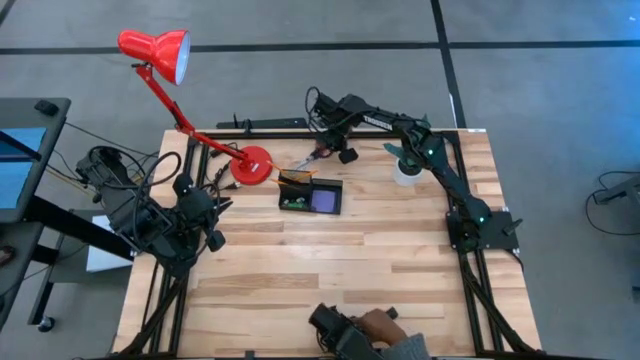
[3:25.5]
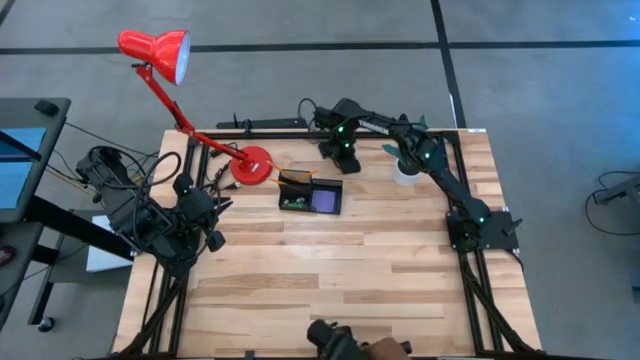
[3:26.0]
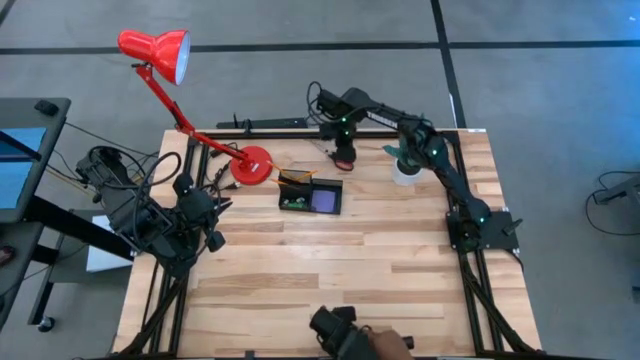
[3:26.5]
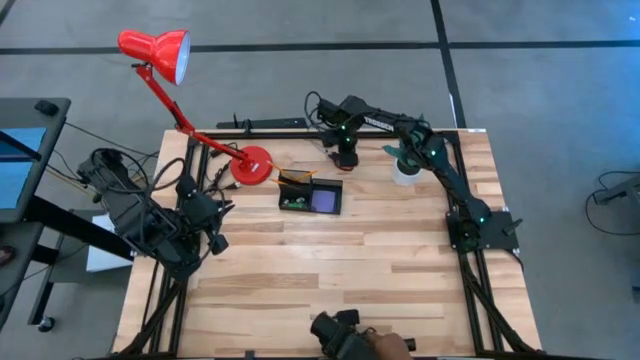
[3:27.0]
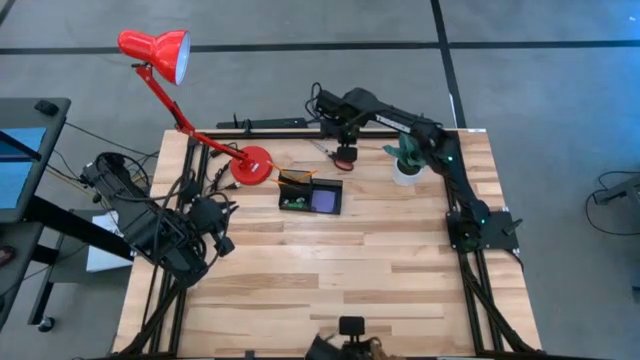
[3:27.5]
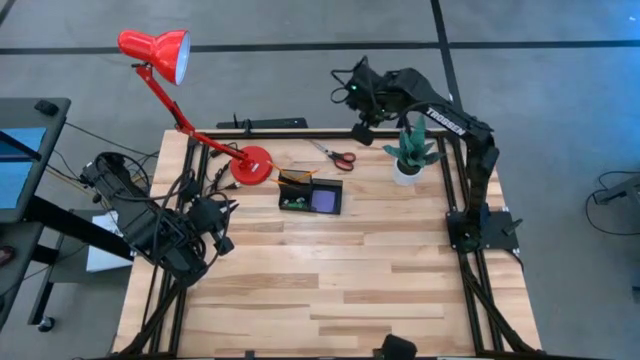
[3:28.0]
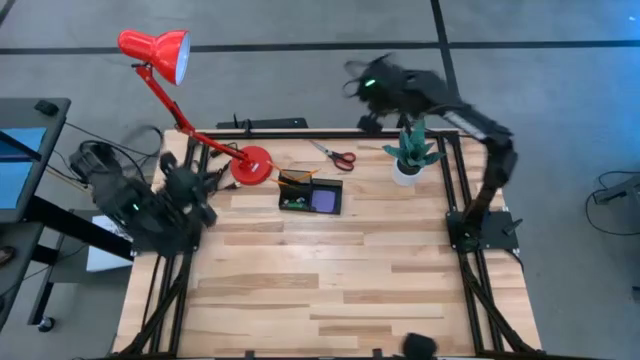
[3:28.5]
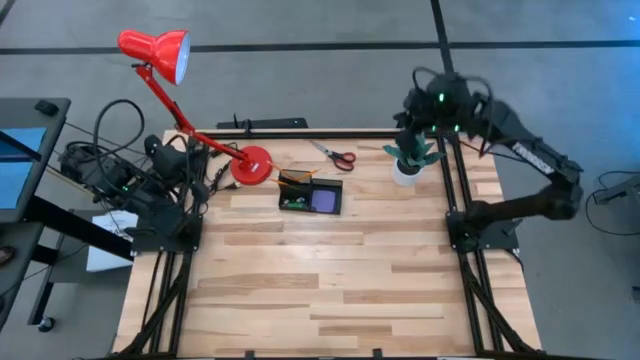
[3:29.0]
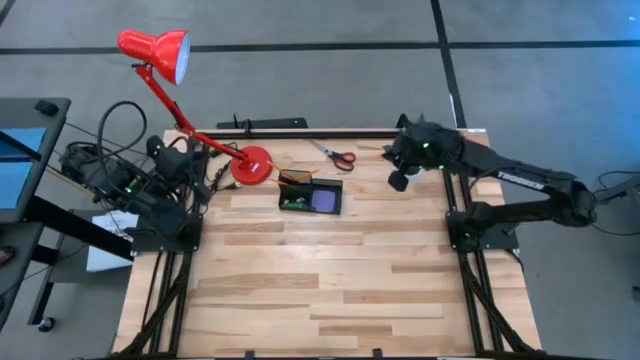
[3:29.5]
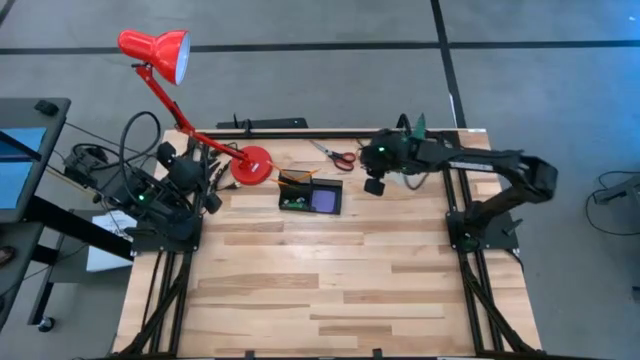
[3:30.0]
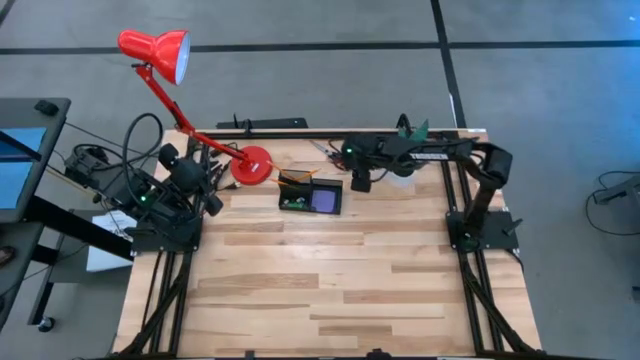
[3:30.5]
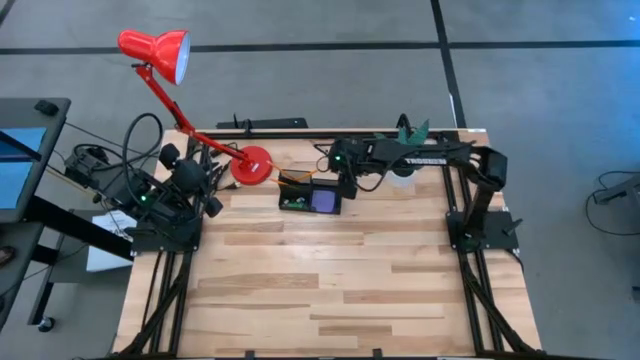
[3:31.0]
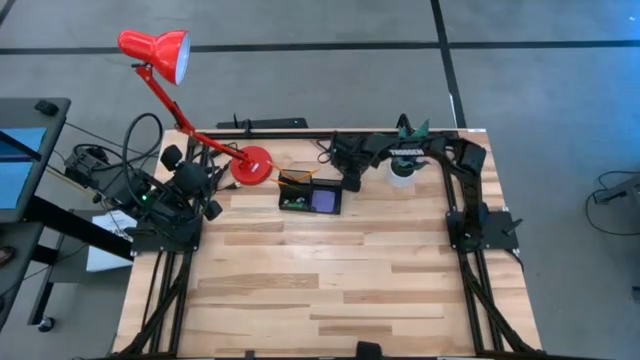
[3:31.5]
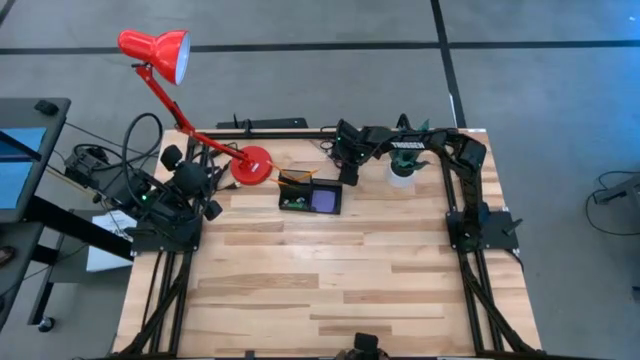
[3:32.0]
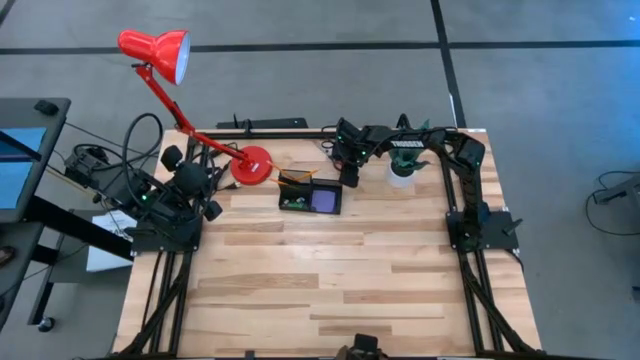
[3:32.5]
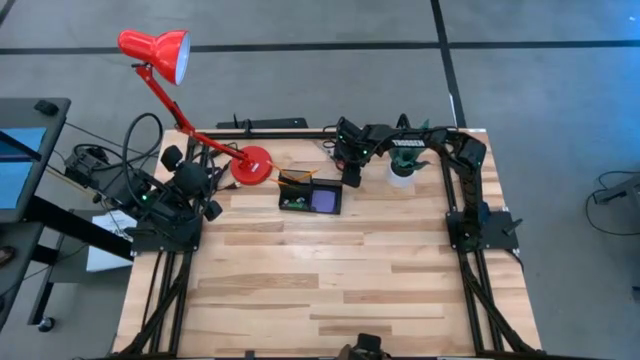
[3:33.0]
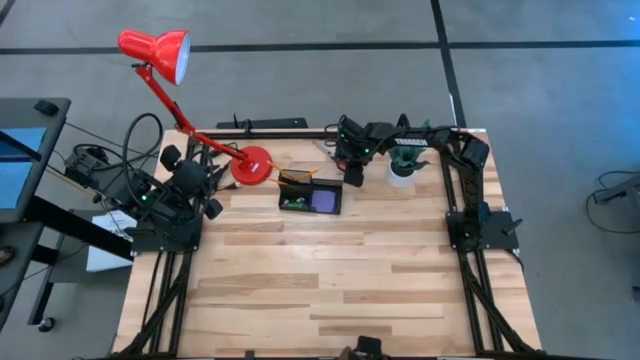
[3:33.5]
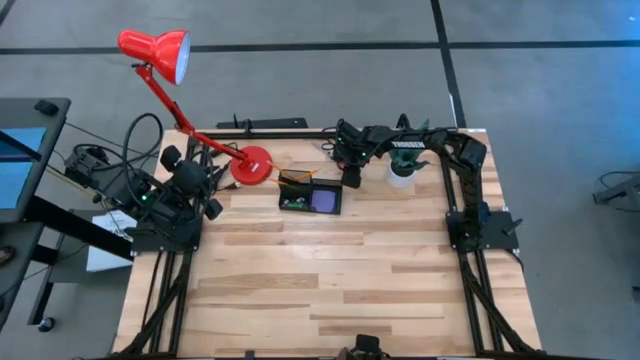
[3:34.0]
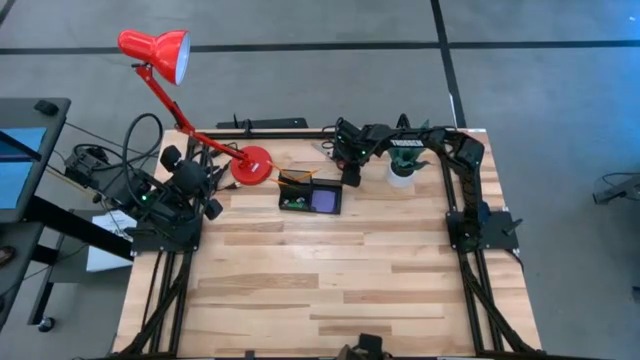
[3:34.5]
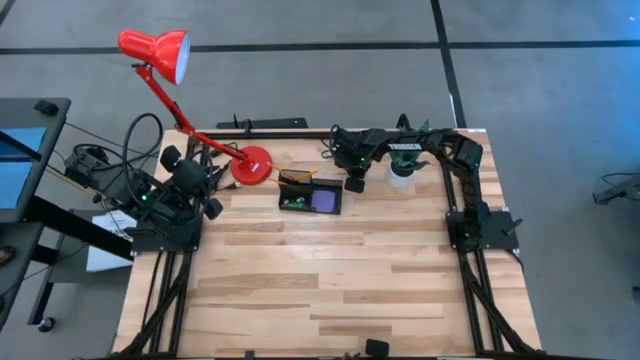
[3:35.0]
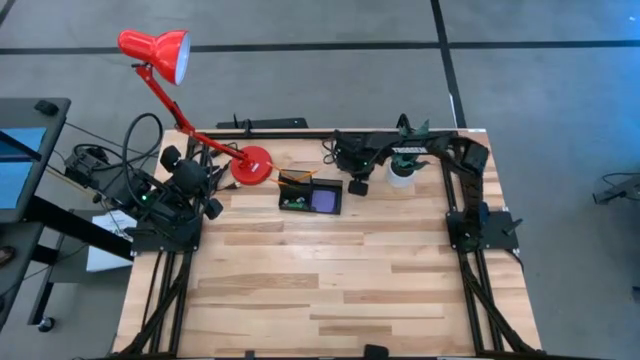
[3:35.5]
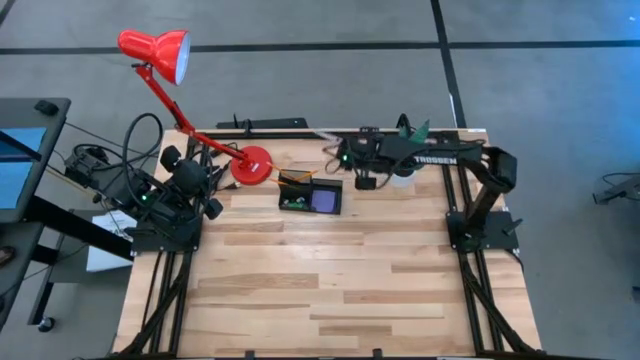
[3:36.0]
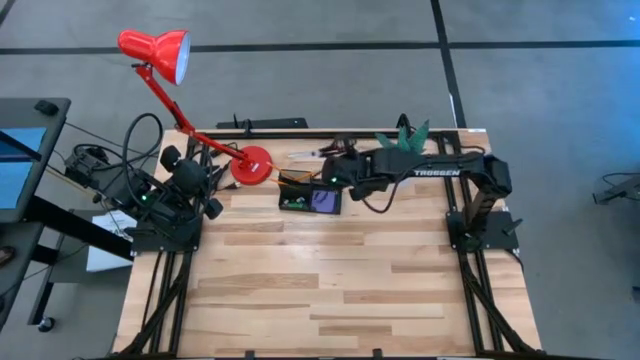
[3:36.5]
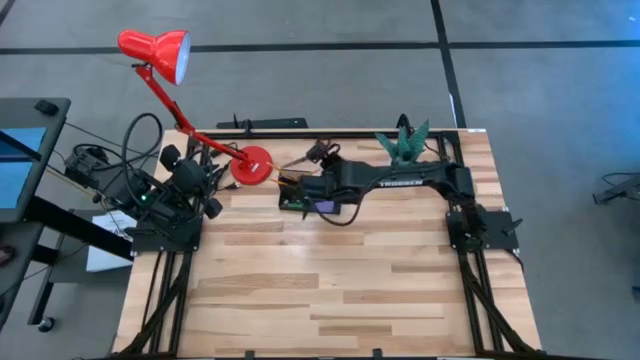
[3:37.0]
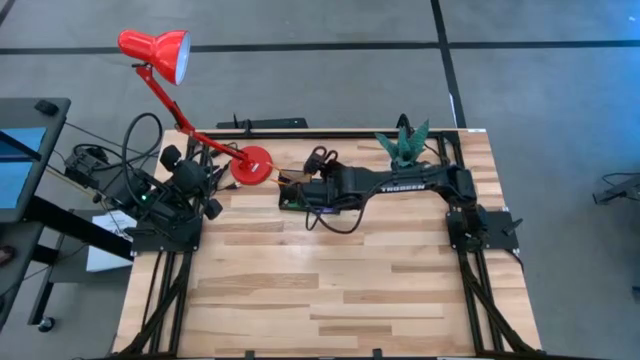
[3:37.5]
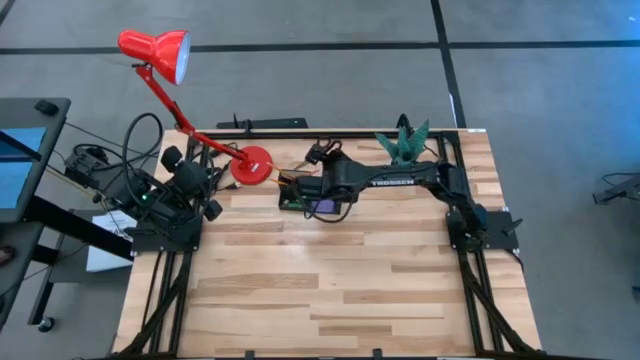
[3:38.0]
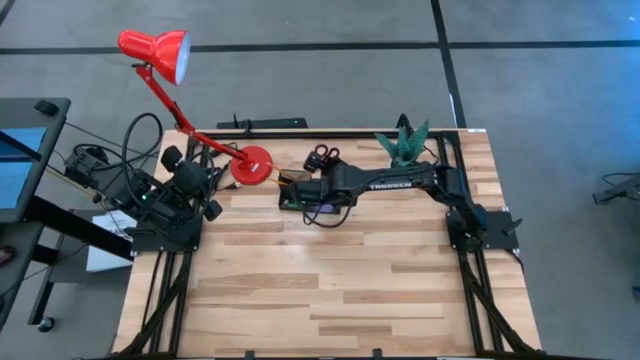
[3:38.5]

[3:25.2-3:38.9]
Task: Pick and place office supplies into organizer
Put the black scissors into the black desk organizer

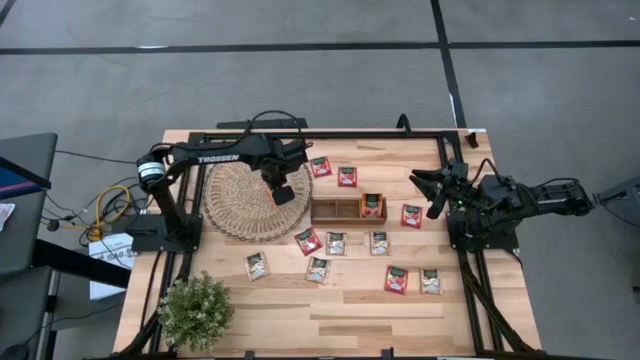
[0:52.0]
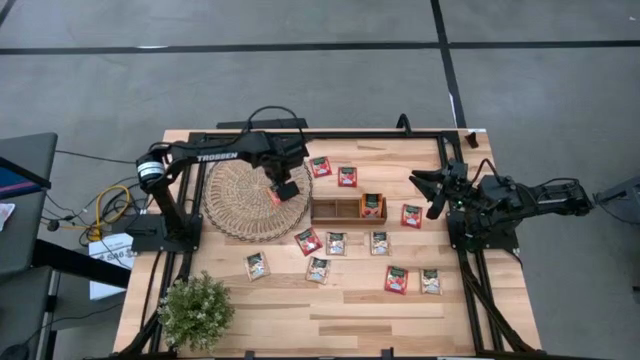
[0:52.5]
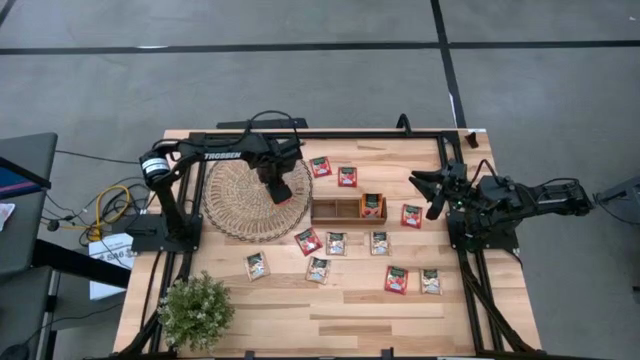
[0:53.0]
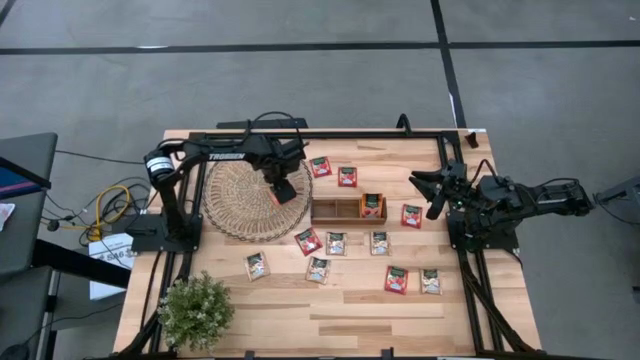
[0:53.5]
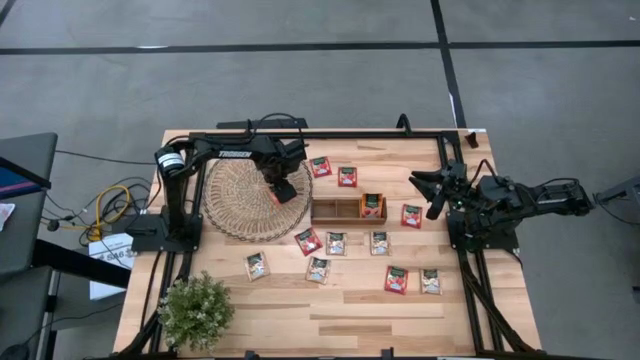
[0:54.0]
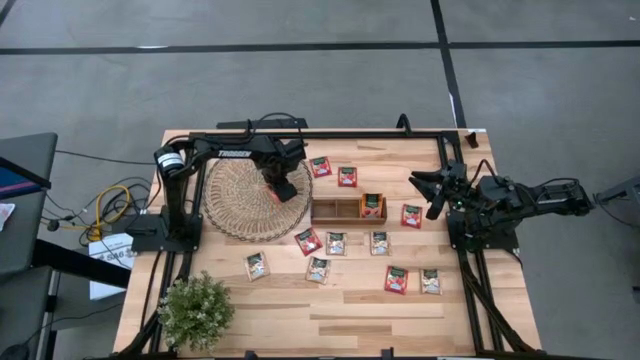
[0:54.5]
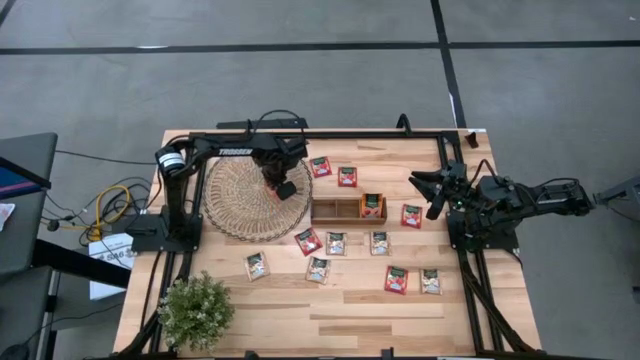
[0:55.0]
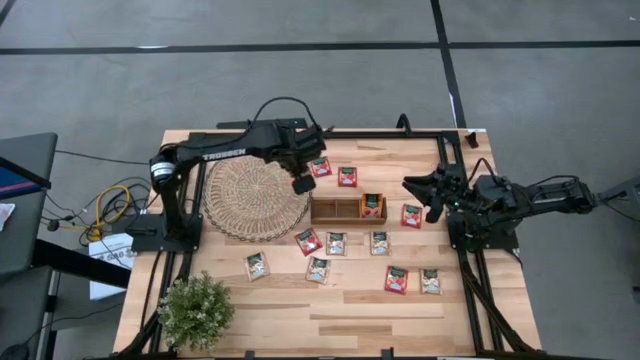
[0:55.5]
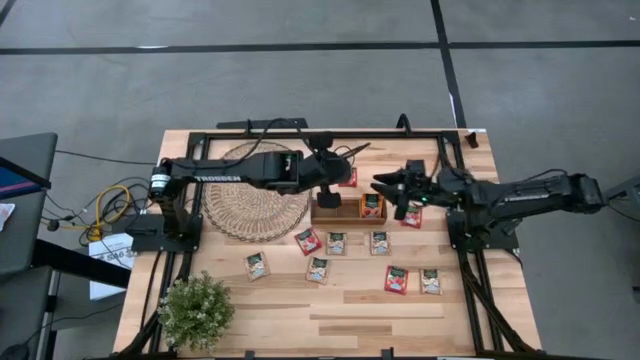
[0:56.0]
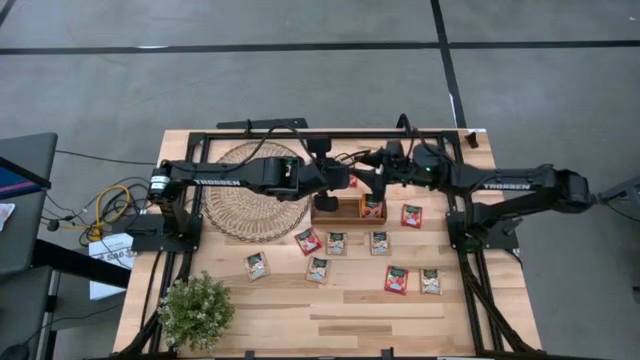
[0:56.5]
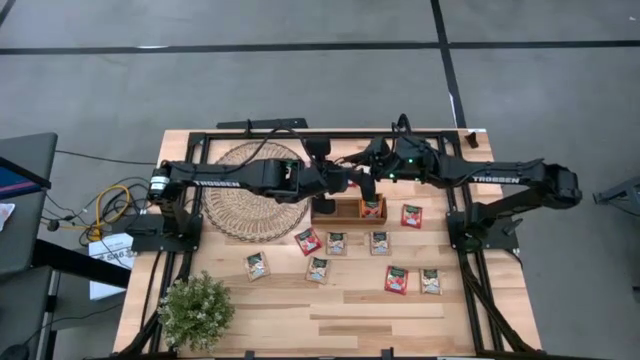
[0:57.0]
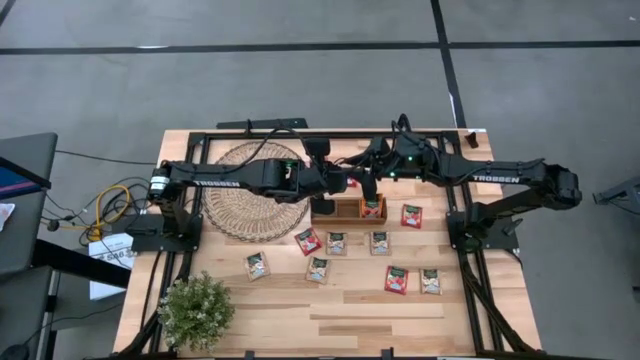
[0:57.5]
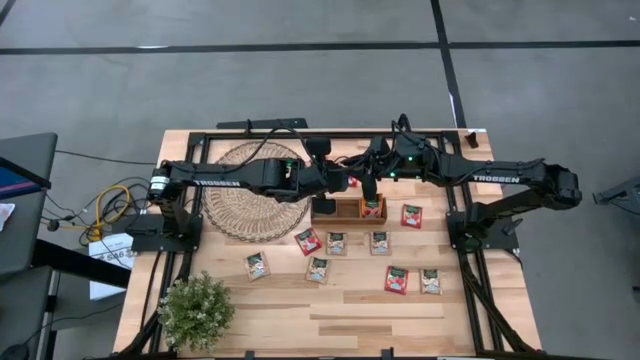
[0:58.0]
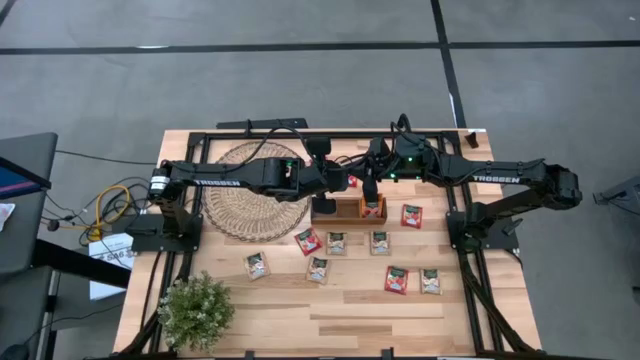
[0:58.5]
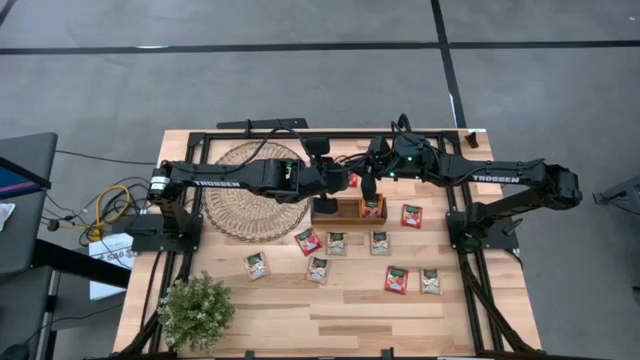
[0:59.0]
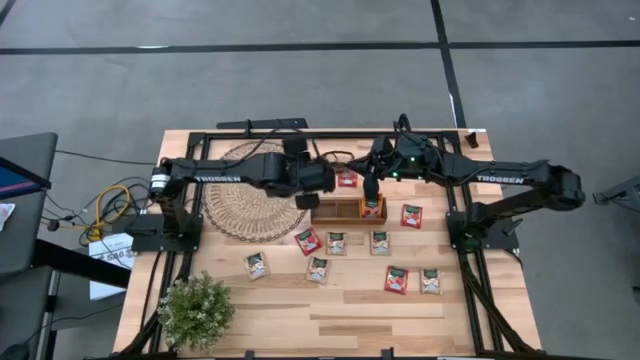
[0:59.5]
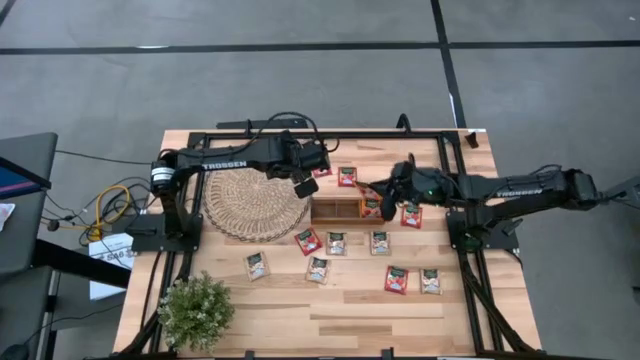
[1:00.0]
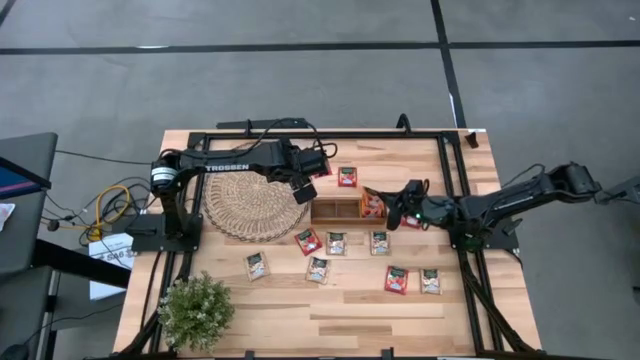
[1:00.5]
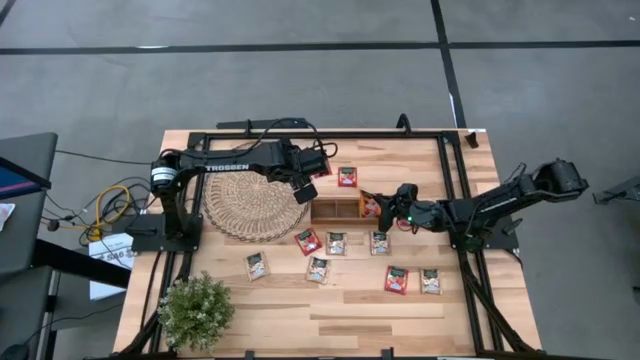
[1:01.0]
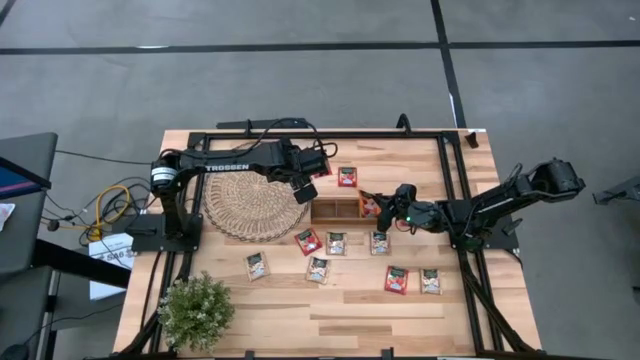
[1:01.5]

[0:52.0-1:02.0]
Task: Pick & Place Tea
Put the orange tea bag into the right section of the wooden organizer
